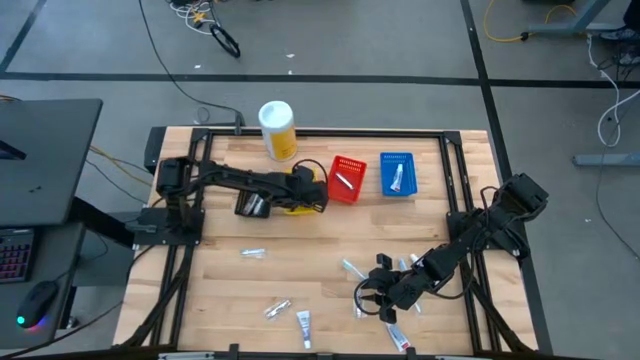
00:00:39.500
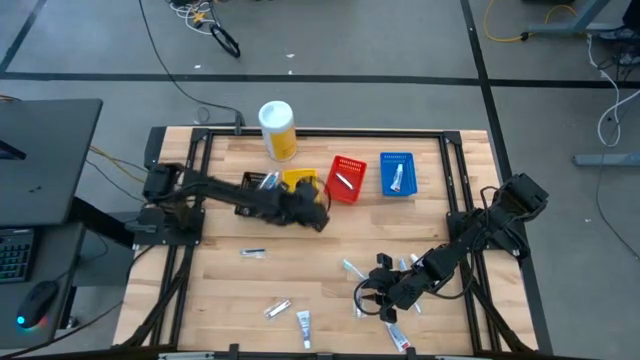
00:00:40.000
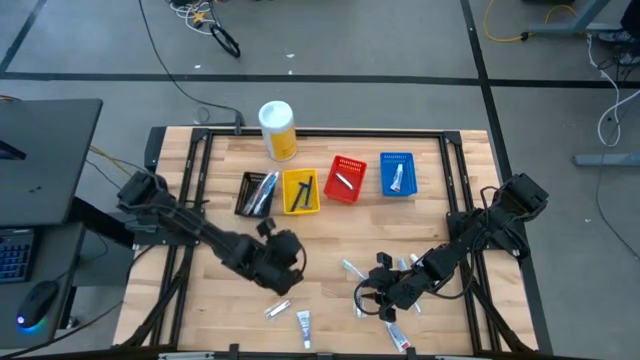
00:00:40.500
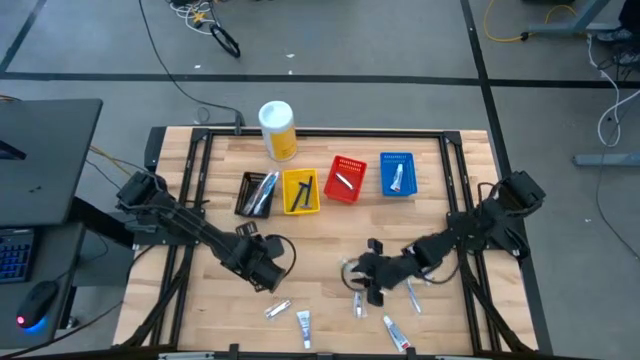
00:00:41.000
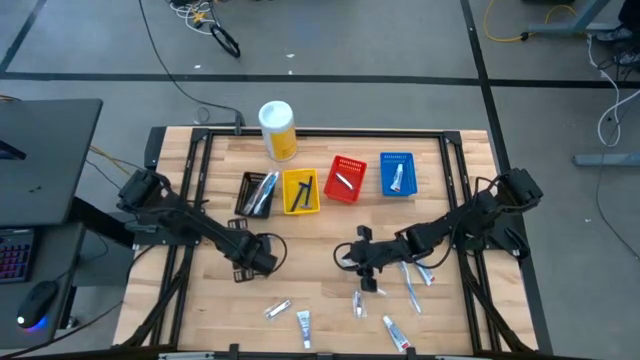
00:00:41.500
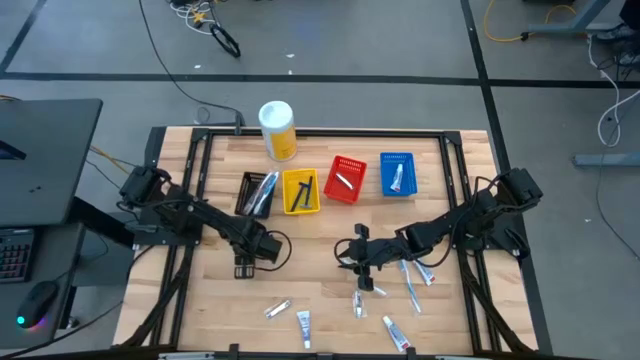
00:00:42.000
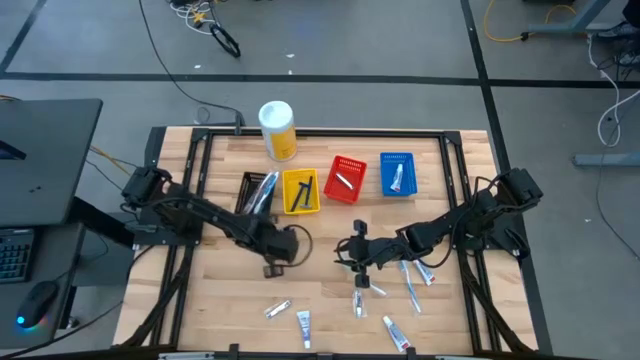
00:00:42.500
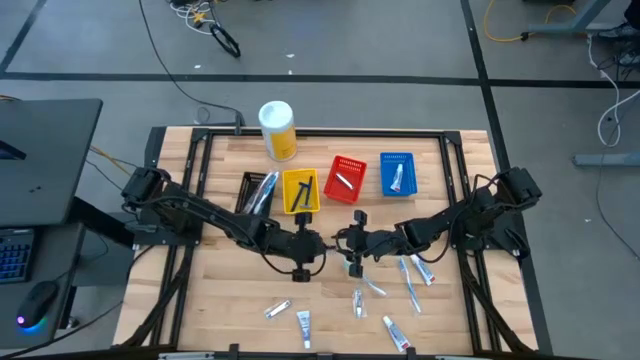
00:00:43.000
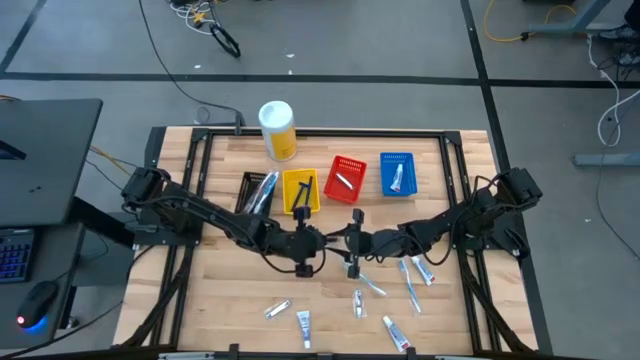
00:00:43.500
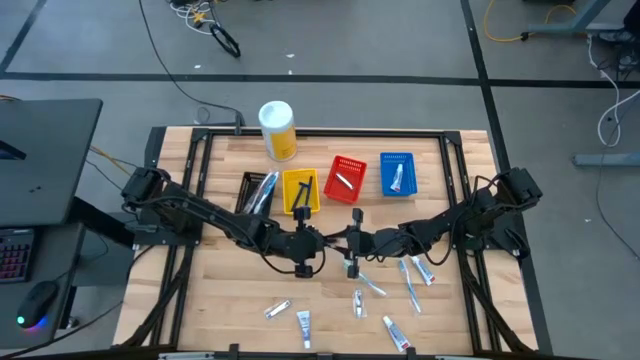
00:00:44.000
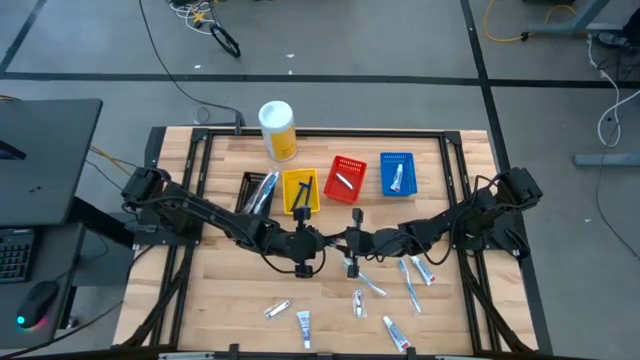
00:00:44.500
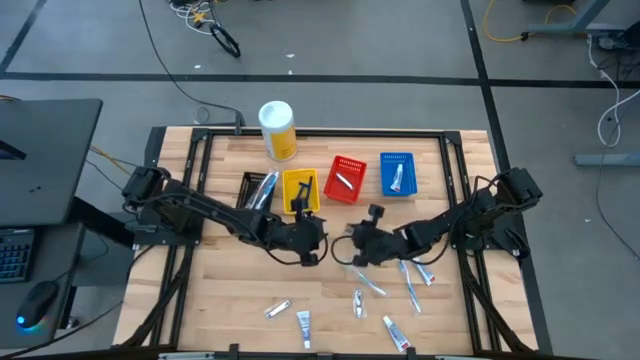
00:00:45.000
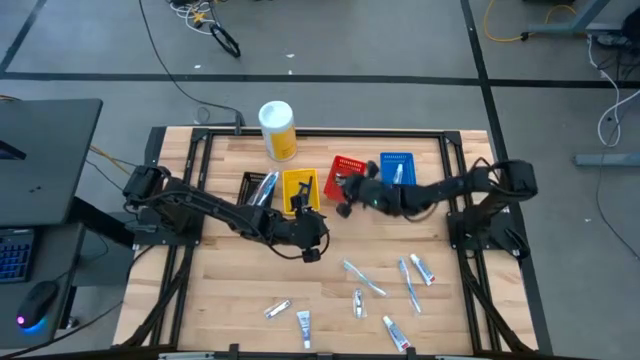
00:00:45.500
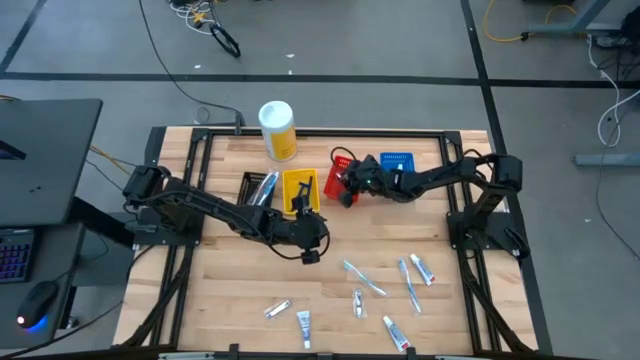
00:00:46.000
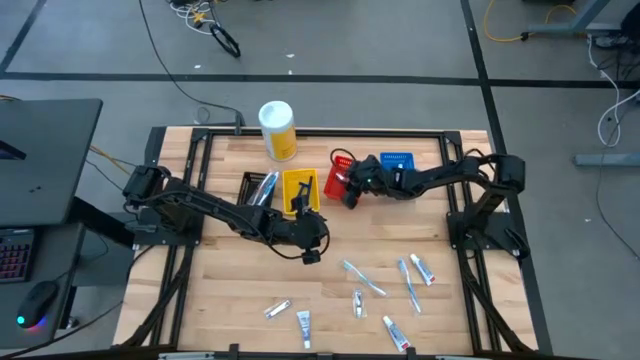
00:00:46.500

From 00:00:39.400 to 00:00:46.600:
Task: Pick & Place Travel size toiletries
Put the silver nail cutter into the red bin

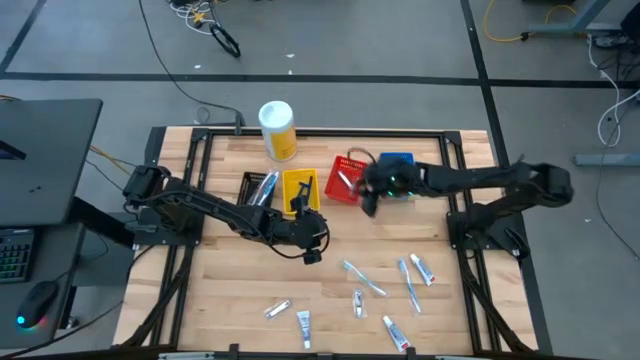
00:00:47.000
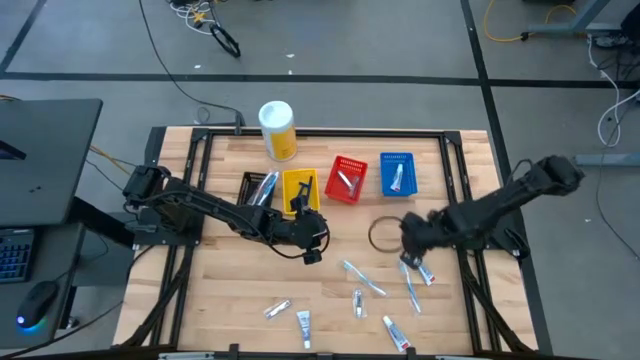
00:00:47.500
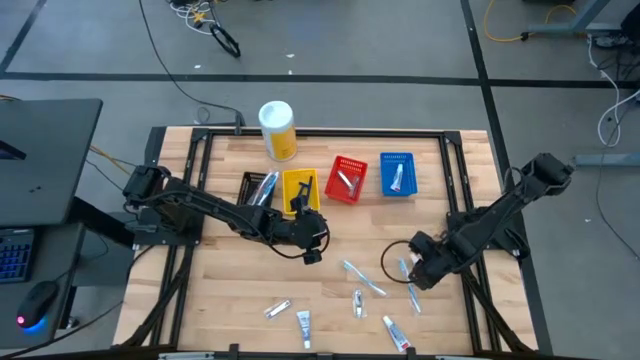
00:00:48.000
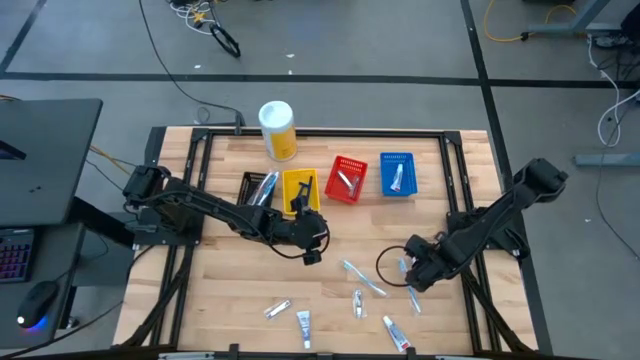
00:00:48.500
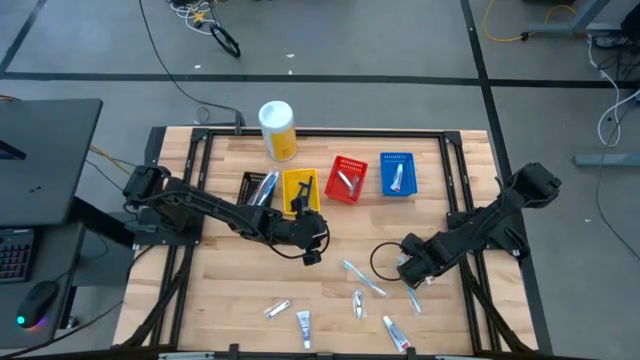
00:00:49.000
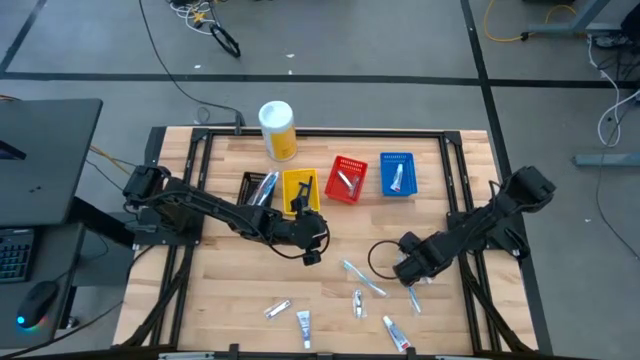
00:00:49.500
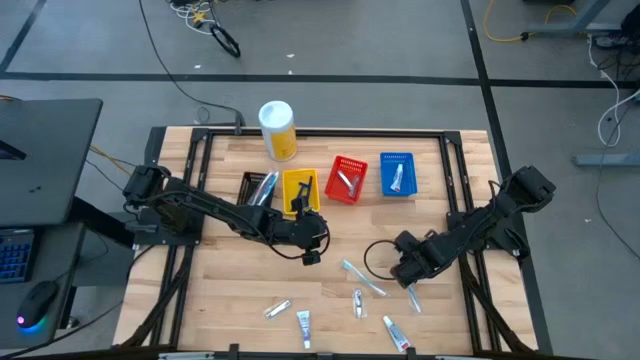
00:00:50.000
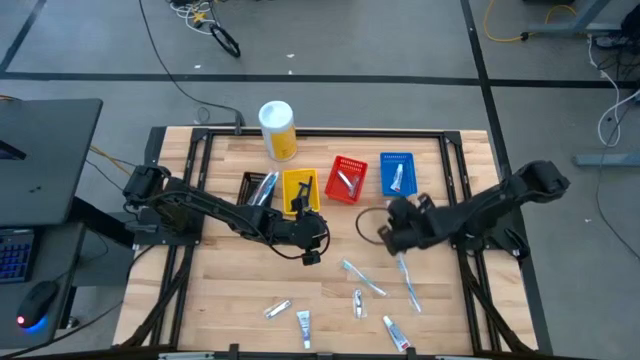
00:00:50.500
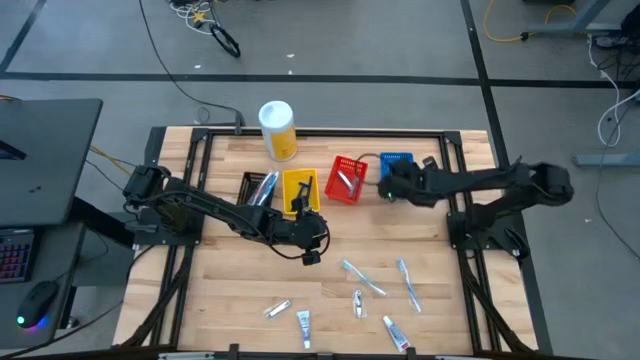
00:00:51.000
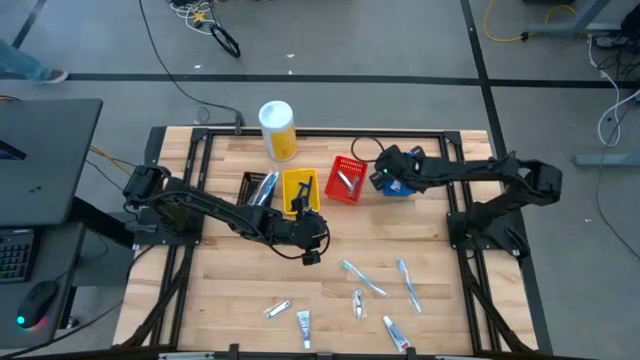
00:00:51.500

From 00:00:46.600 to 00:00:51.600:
Put the white toothpaste into the blue bin

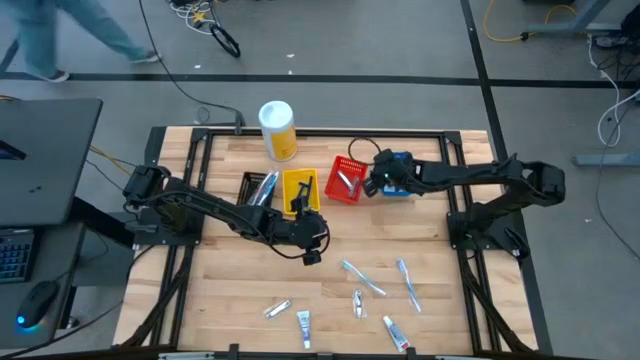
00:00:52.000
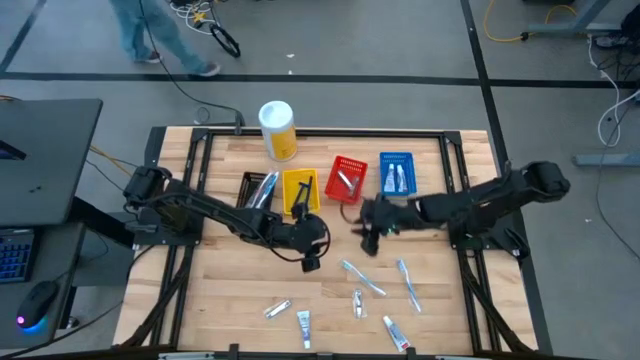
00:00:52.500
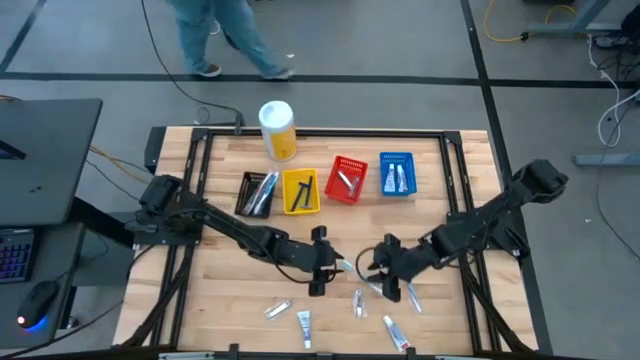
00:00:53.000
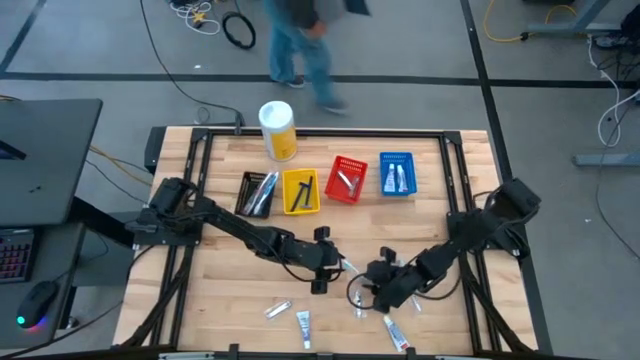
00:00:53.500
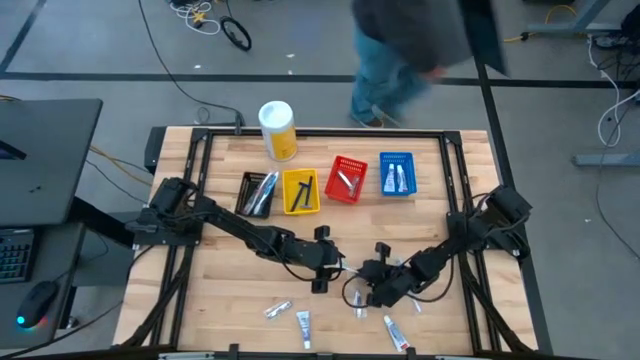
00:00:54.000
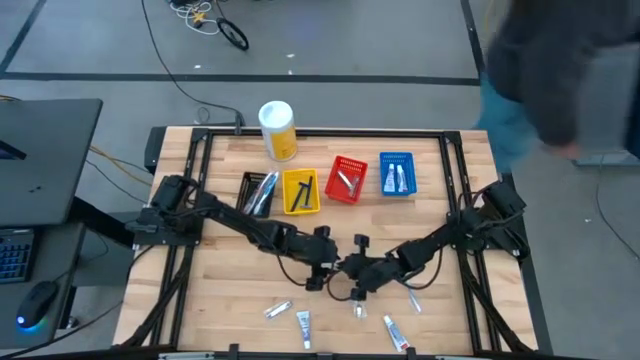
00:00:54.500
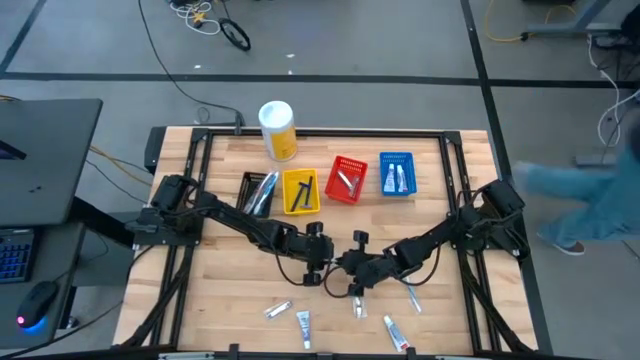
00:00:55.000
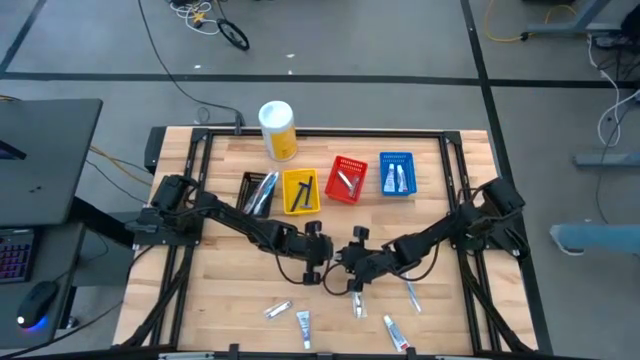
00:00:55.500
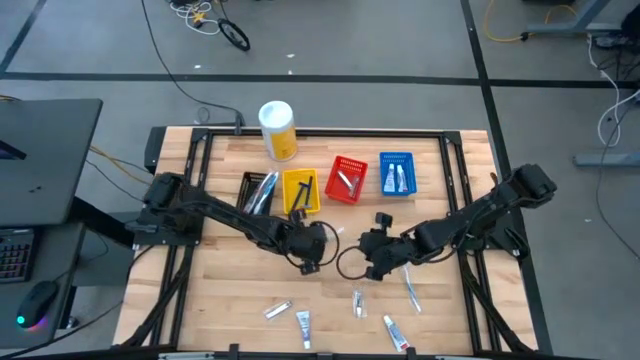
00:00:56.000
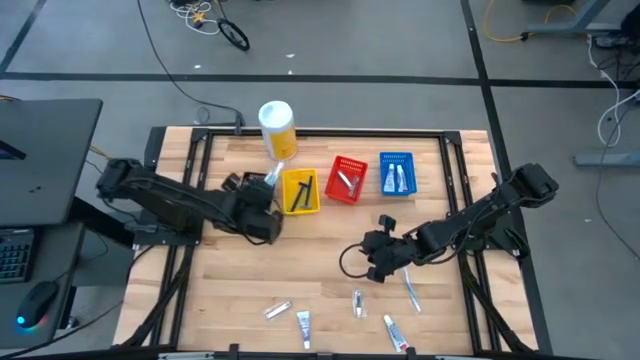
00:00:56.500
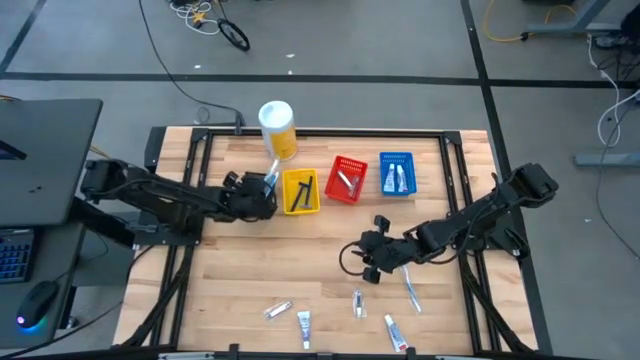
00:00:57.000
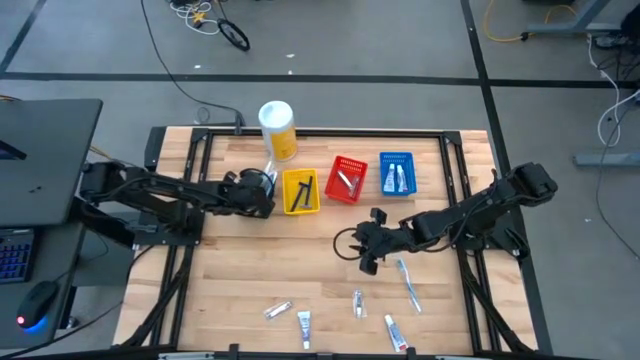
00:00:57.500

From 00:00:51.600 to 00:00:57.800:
Put the green toothbrush into the black bin

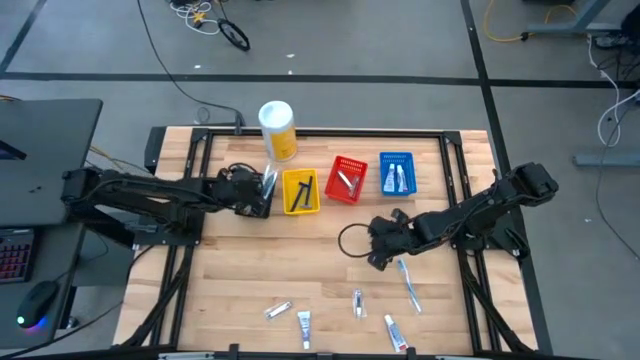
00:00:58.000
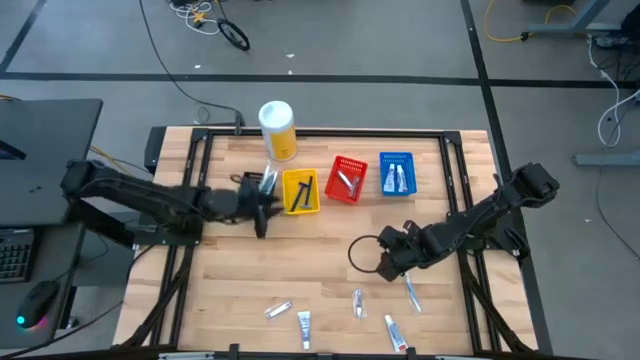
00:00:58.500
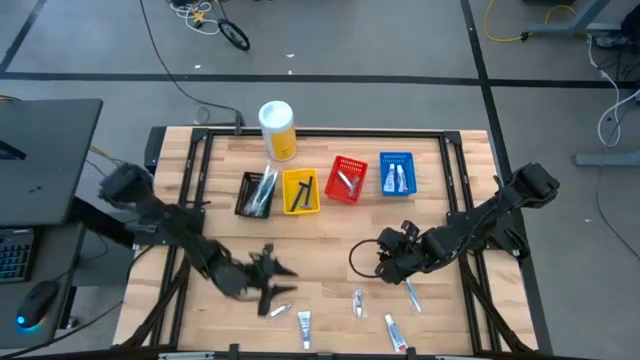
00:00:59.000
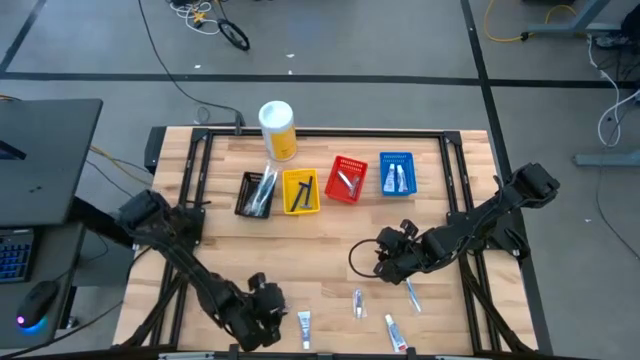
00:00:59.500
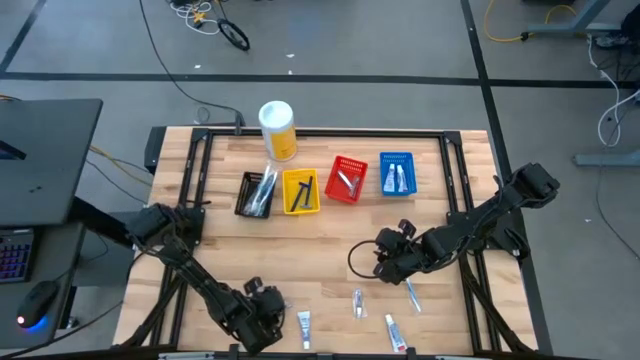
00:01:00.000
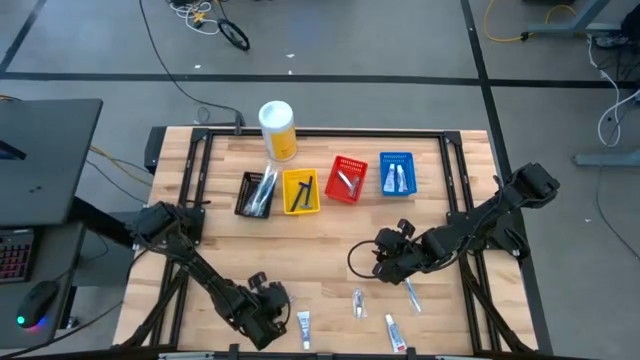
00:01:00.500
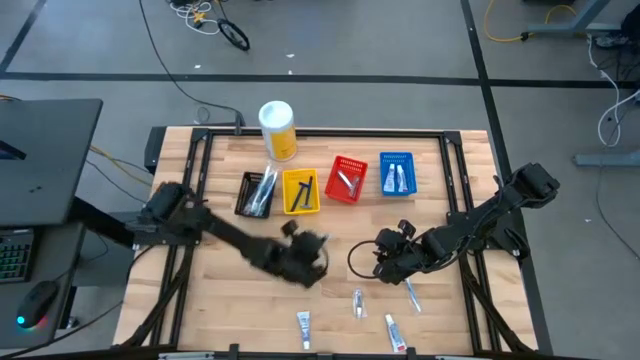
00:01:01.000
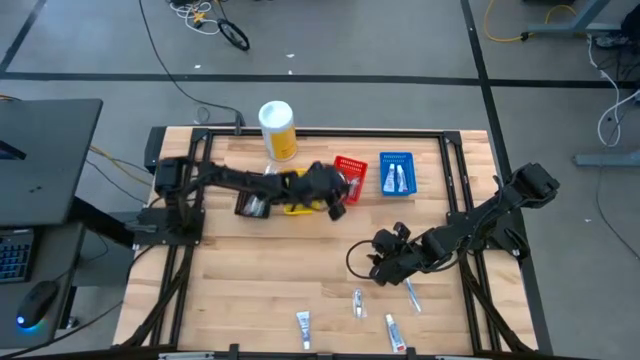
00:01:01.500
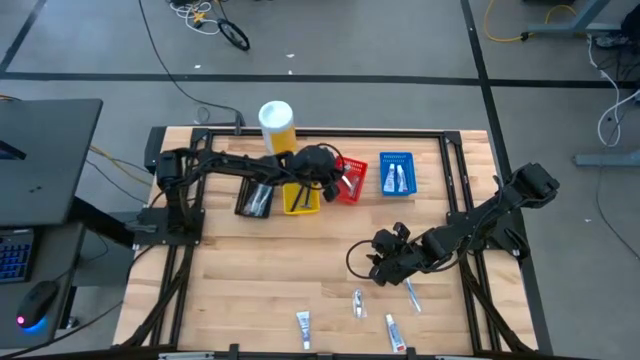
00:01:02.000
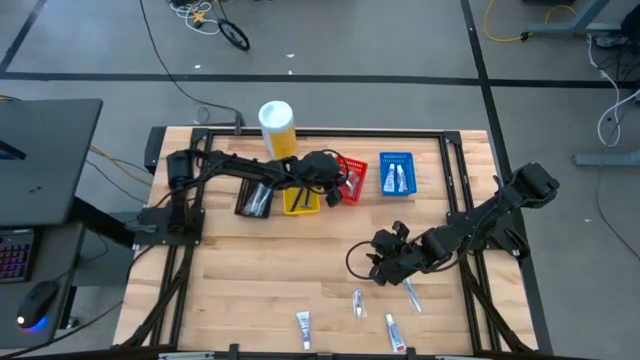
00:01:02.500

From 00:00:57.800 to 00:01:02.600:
Put the silver nail cutter into the red bin
